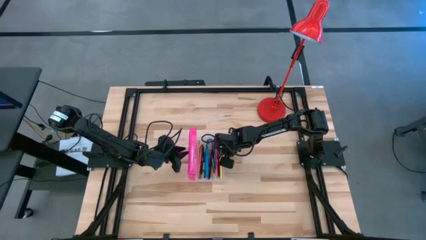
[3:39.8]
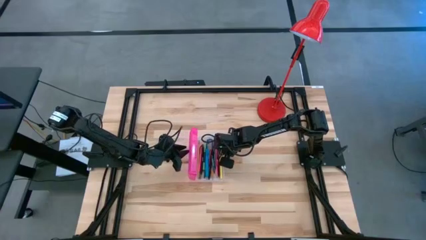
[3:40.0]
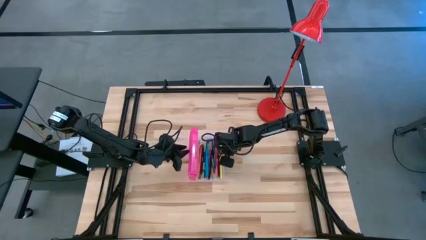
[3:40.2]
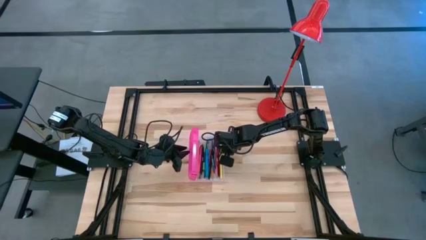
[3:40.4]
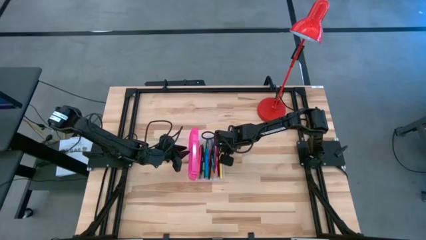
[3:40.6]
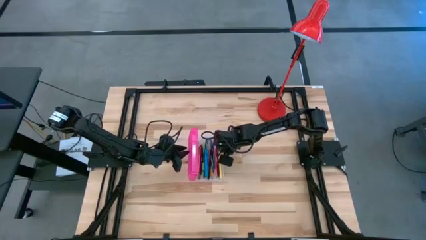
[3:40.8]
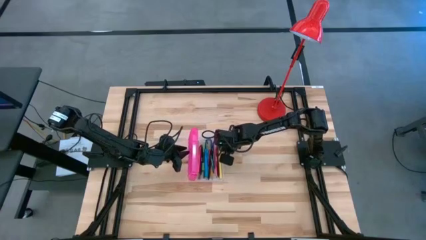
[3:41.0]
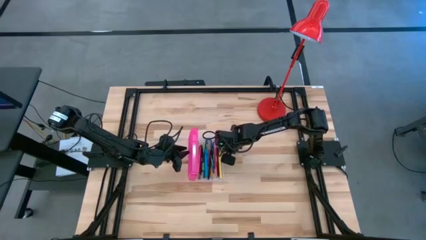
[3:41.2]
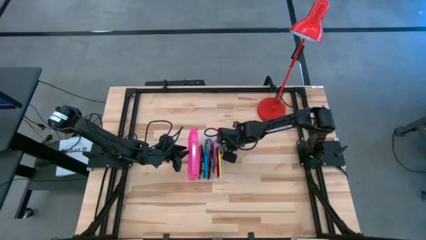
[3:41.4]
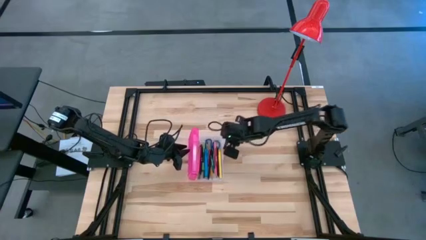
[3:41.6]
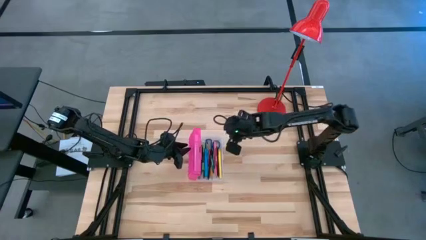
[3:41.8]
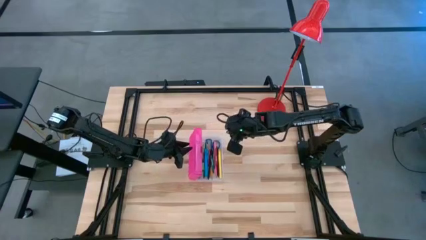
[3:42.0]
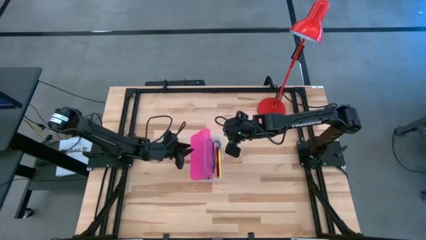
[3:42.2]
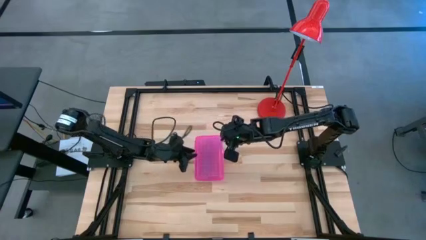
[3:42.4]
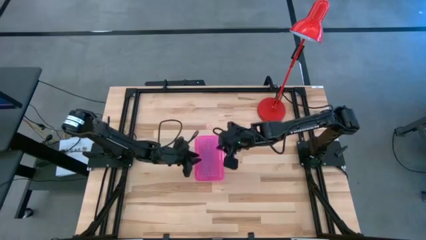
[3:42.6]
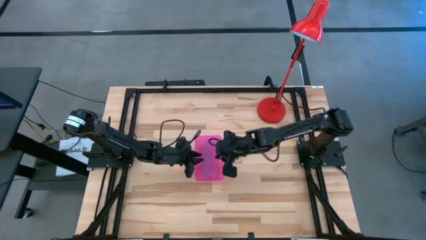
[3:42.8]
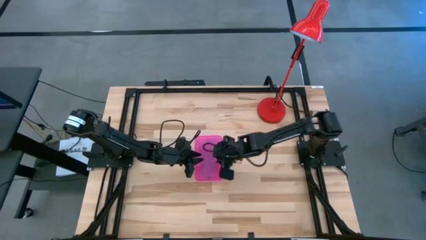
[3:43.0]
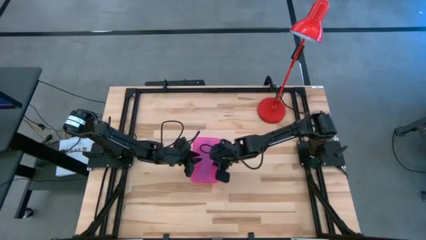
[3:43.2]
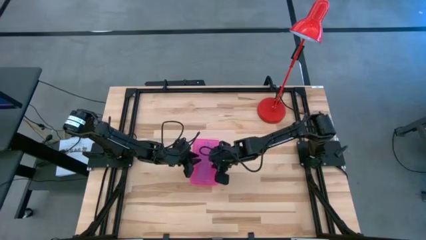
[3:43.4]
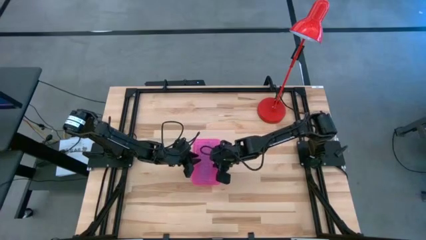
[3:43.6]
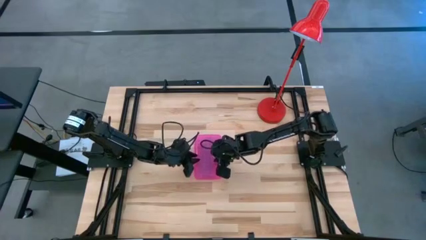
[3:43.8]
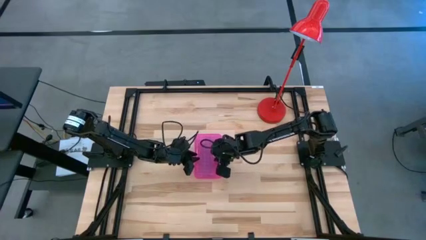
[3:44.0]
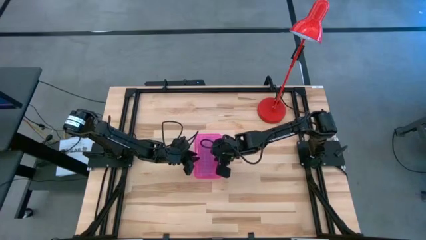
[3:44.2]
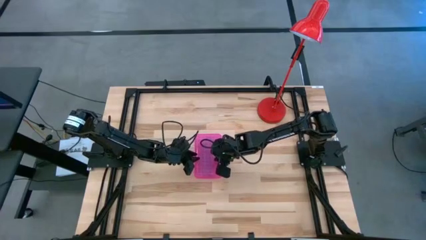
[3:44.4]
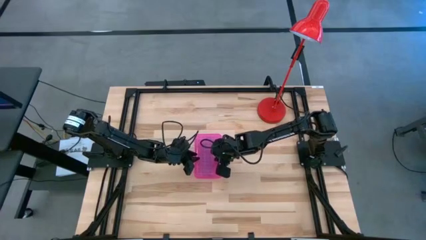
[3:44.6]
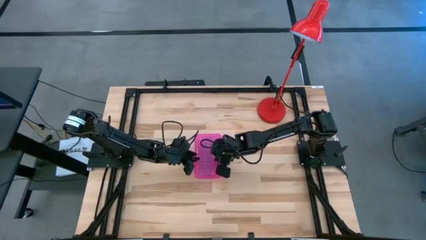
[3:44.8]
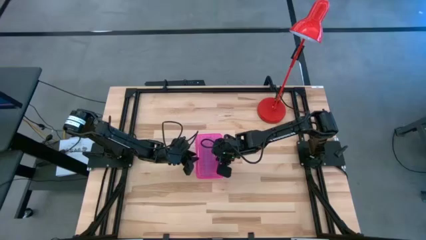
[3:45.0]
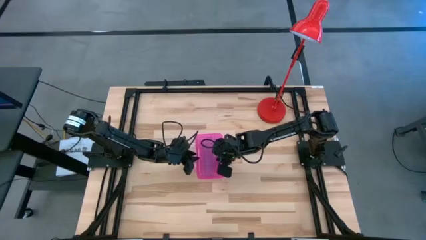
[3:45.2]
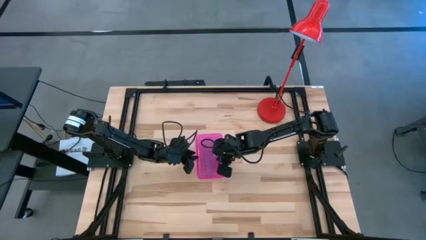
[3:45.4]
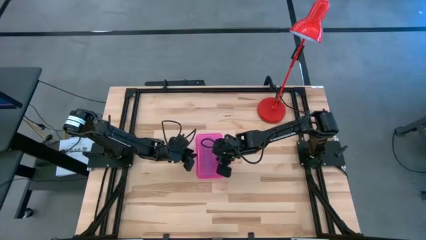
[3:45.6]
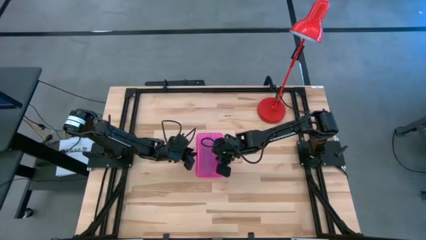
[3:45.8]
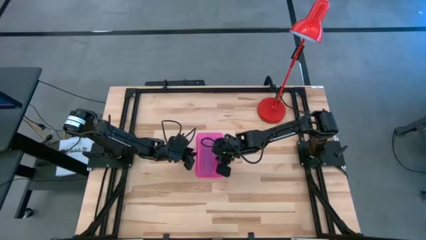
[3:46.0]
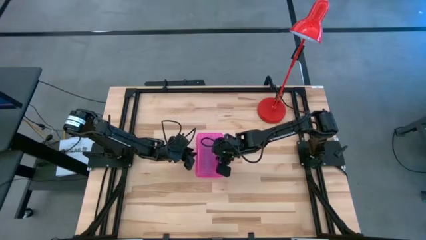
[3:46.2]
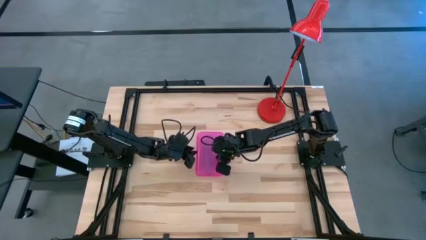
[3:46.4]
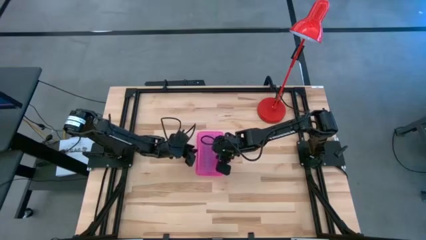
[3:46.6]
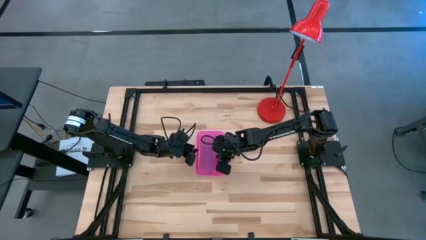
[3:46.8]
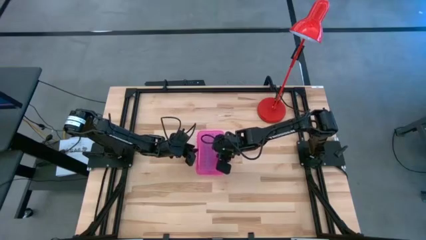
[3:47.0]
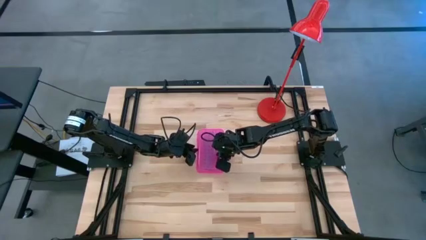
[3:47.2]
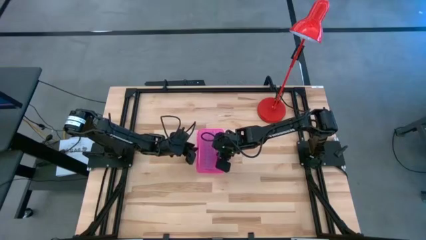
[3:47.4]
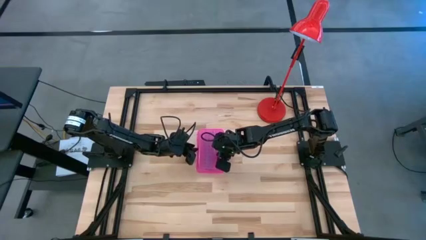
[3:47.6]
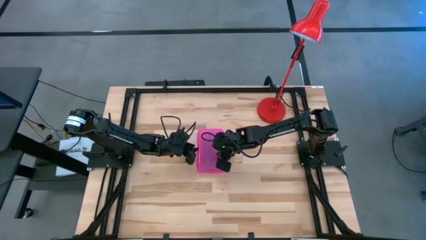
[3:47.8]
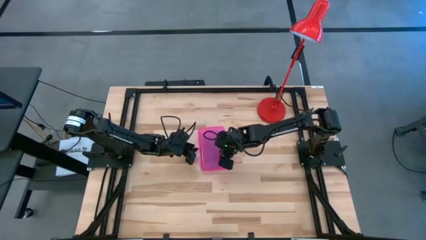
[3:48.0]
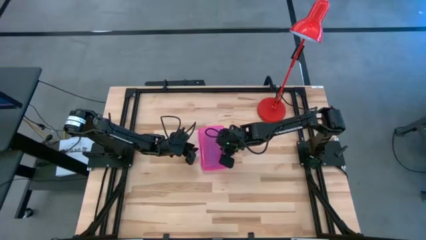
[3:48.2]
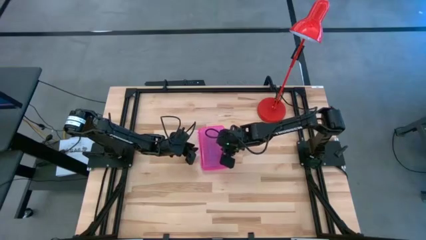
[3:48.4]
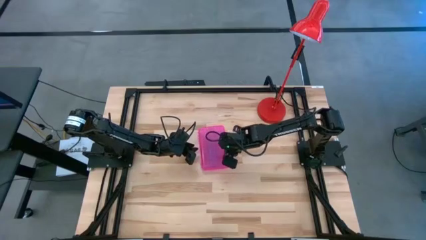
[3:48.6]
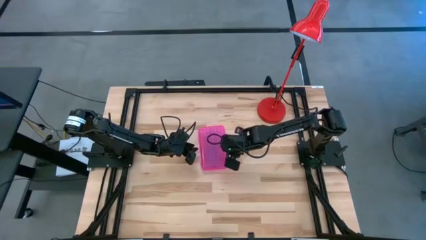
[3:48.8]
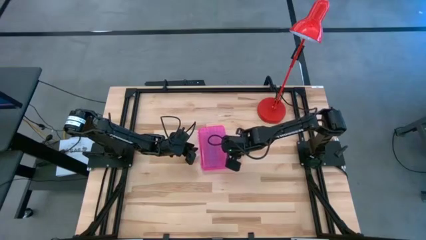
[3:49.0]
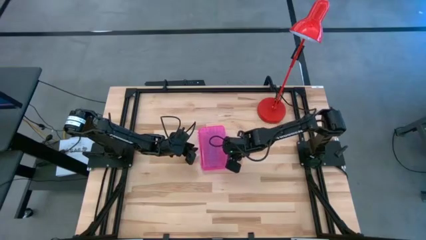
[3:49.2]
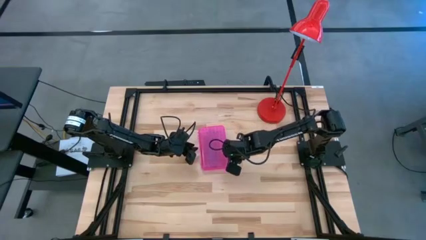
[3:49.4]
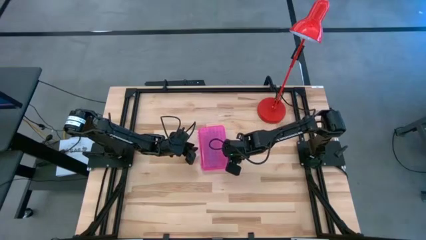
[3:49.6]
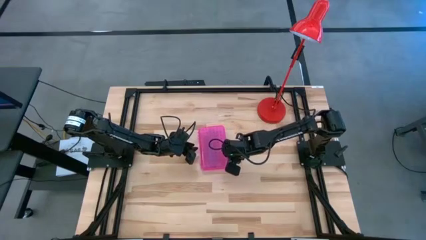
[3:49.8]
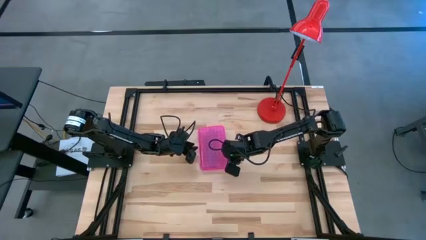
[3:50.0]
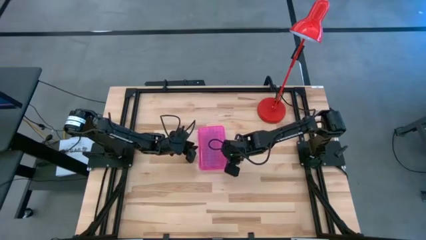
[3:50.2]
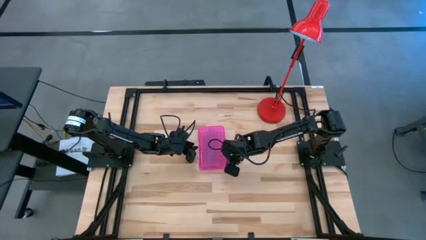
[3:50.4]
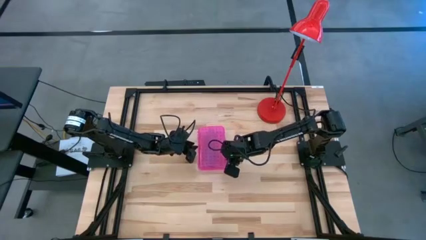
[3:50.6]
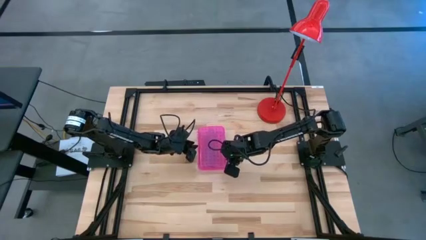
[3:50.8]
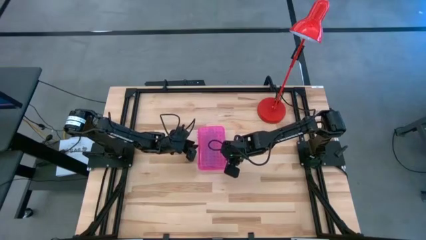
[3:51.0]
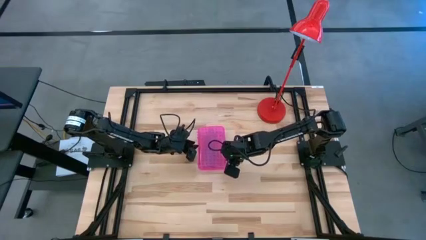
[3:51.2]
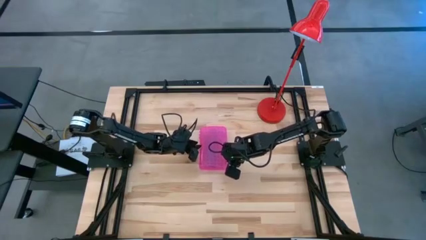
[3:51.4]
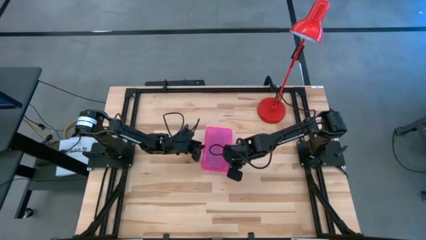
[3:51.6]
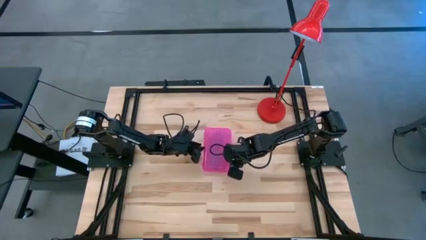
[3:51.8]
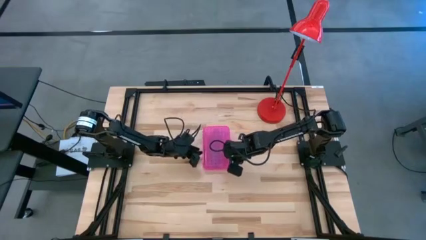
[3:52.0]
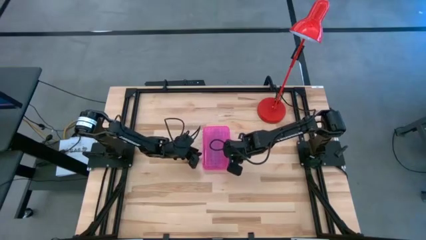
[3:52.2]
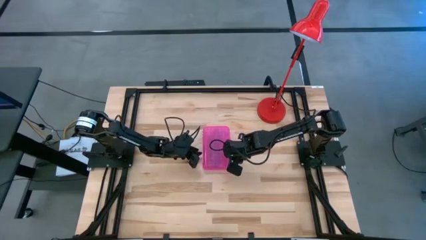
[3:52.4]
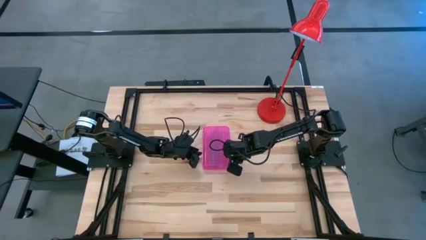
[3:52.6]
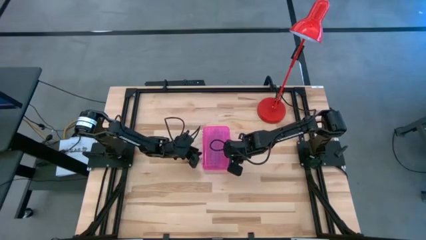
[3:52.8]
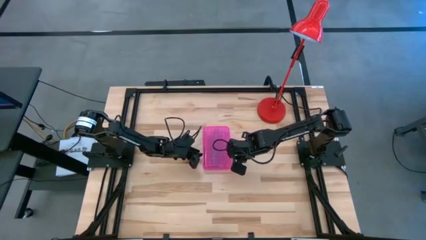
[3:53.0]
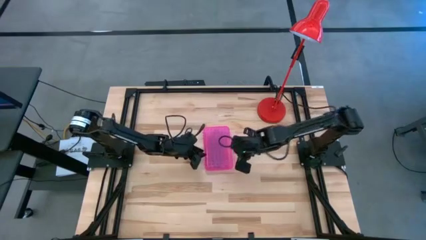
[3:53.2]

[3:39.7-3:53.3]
Task: Pick & place school supplies into a supply box
Close the pink supply box

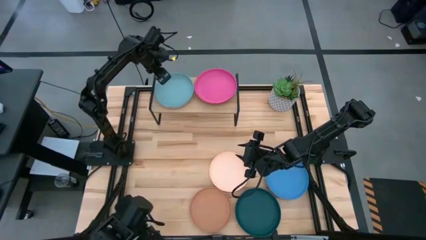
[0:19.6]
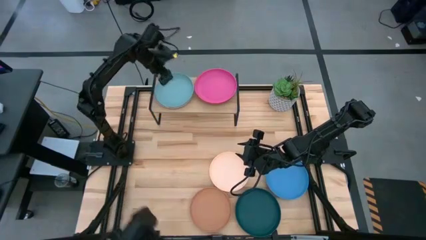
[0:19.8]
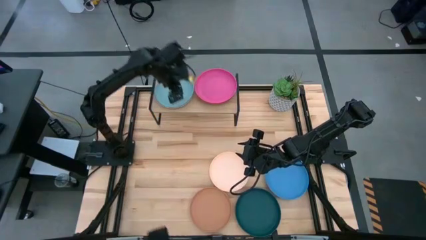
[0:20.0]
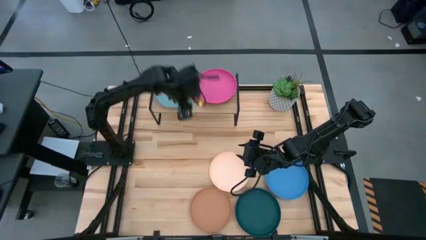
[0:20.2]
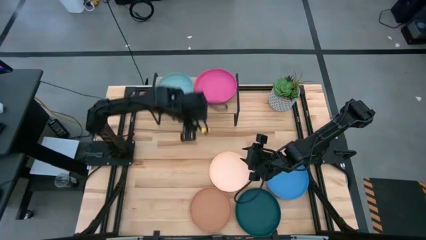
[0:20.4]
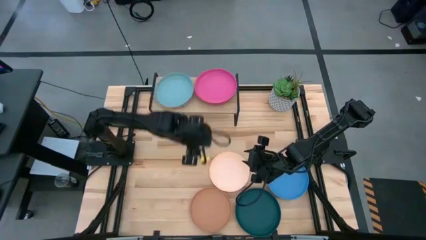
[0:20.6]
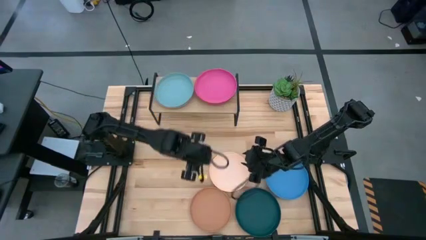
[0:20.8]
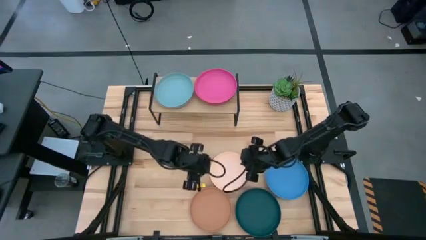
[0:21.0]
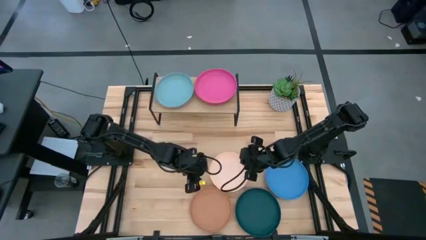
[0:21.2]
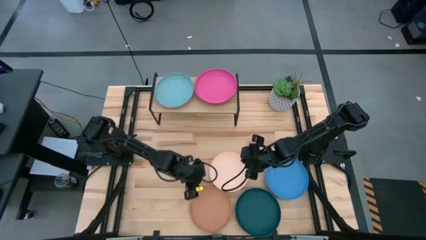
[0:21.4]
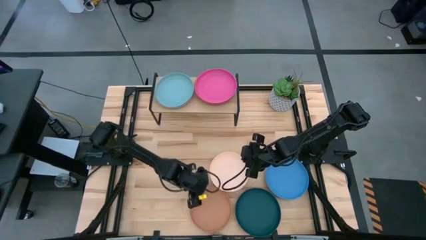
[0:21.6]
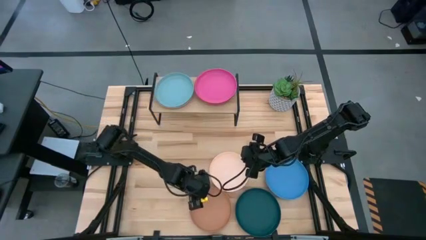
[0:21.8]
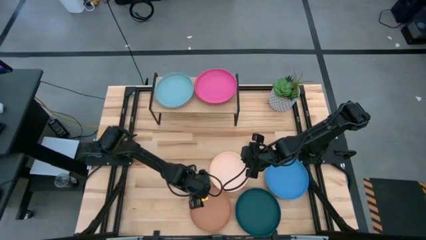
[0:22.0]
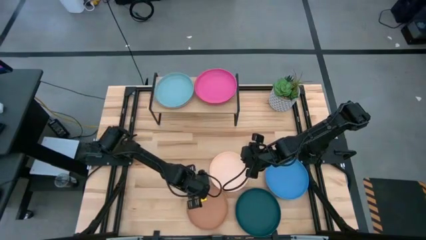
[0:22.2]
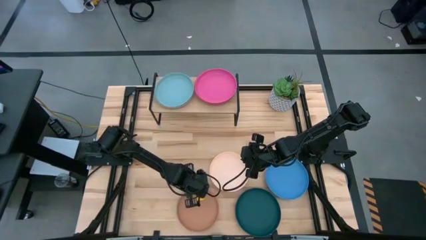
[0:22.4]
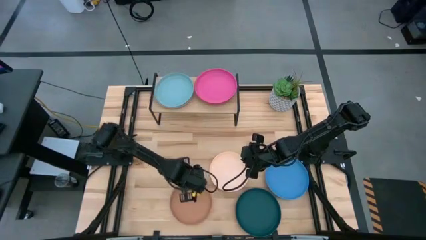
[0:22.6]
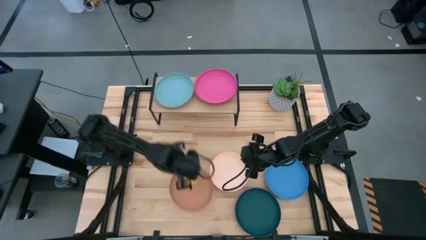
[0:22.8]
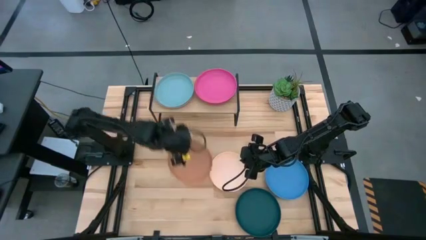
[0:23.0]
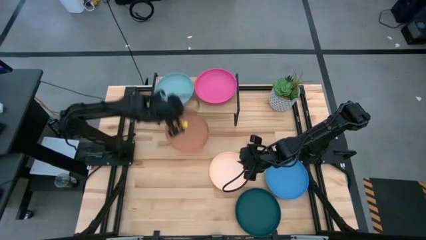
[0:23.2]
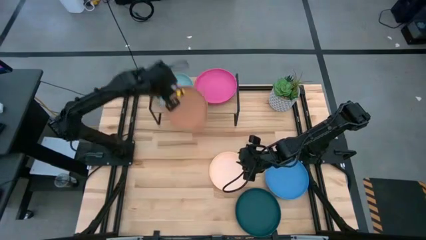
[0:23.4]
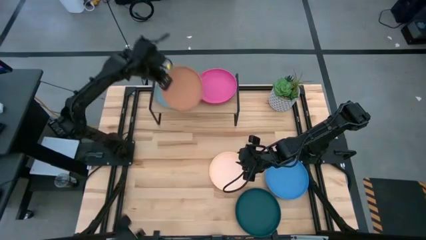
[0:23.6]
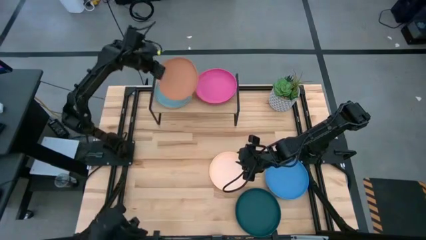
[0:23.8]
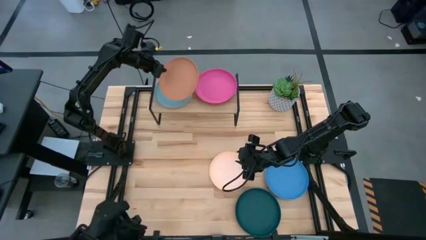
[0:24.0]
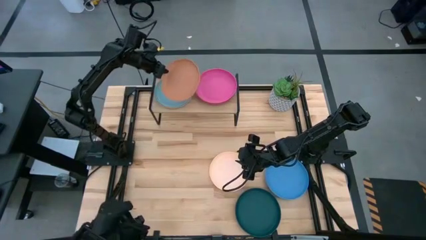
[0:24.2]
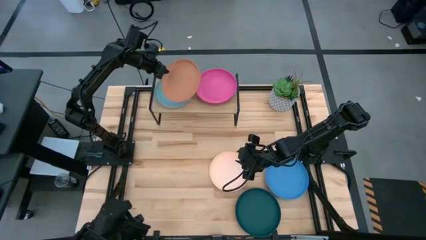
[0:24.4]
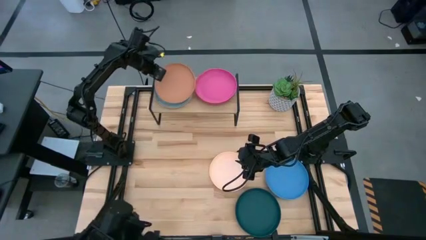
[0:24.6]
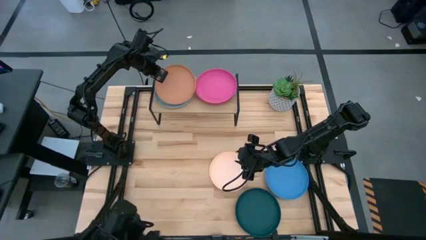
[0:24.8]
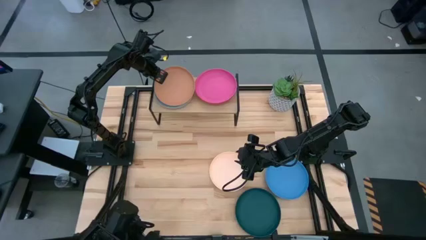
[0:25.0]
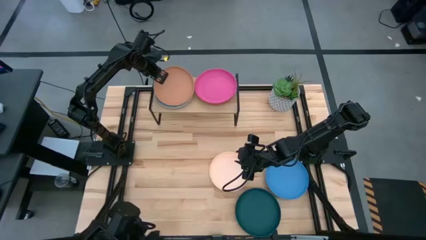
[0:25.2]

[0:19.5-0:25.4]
Task: Place and stack plates onto a shelf
Stack the brown plate on top of the light blue plate on the shelf
